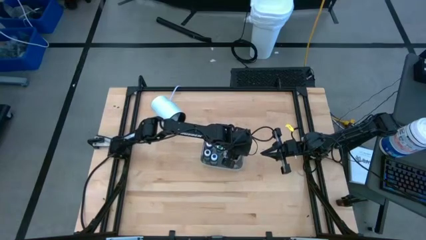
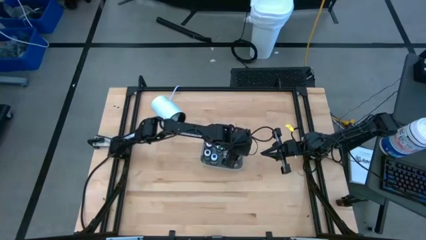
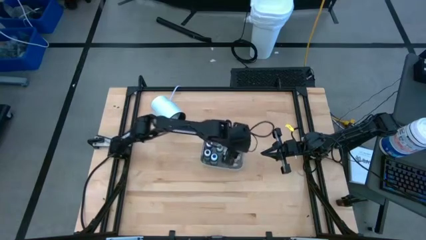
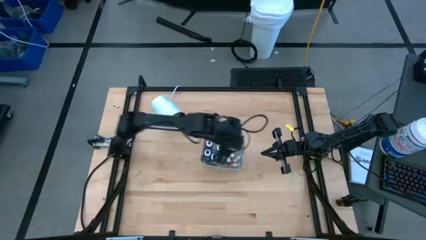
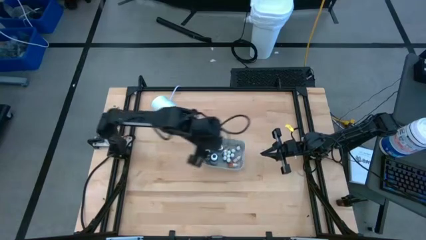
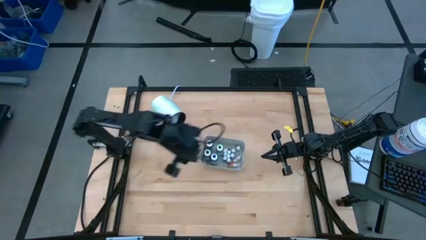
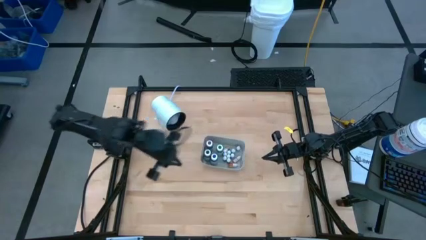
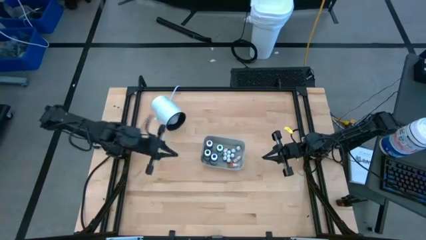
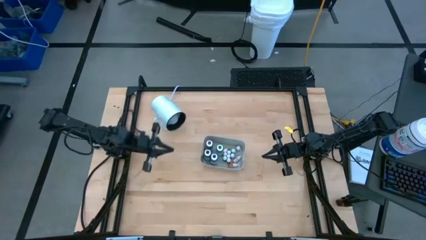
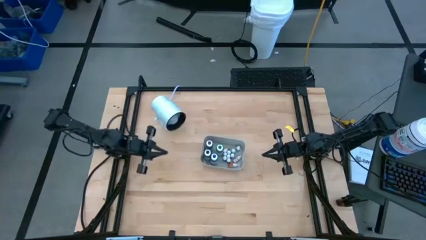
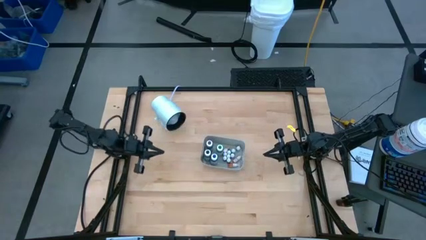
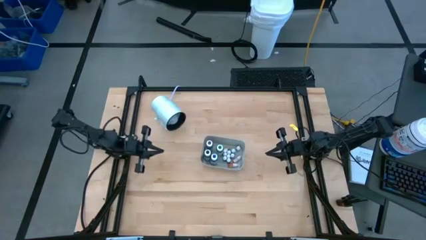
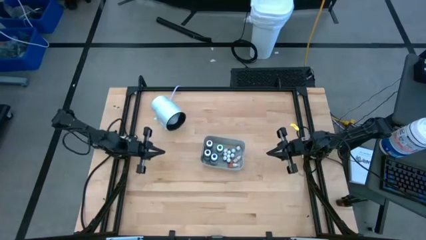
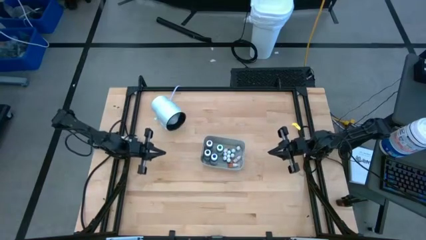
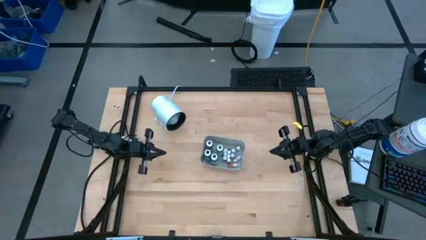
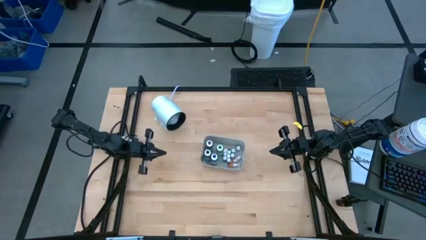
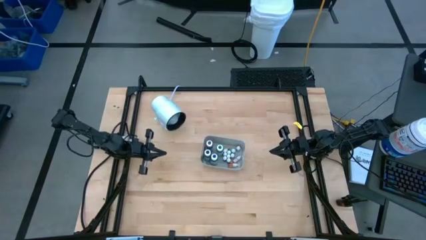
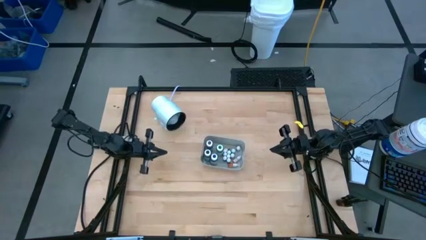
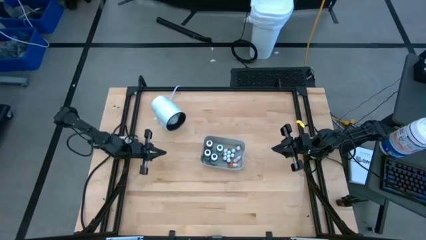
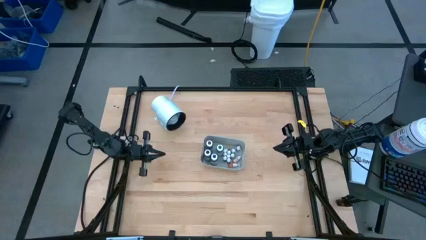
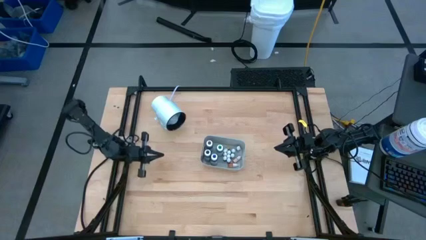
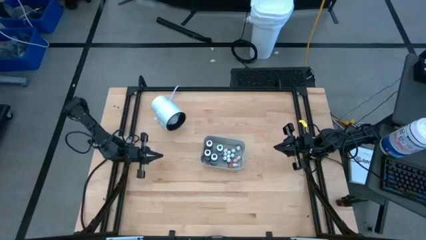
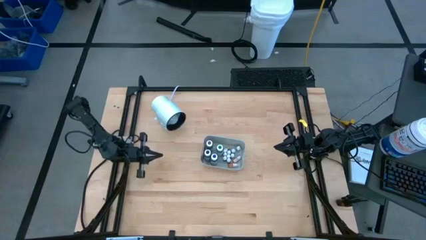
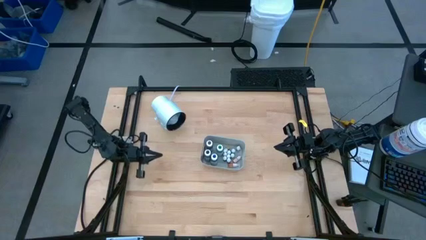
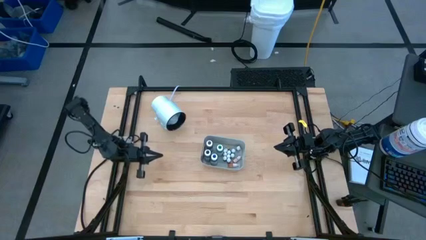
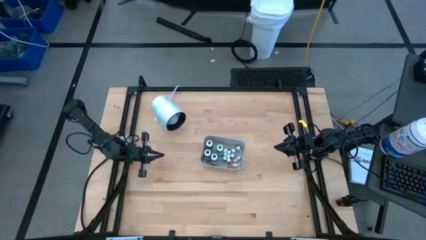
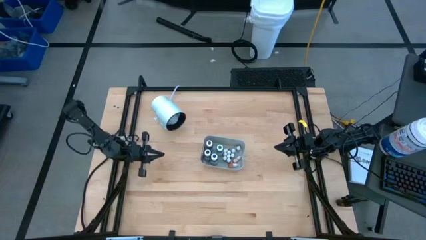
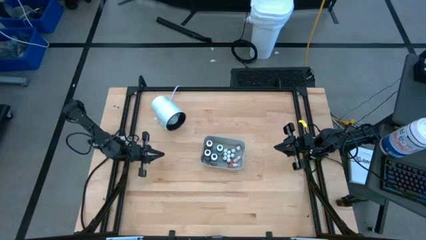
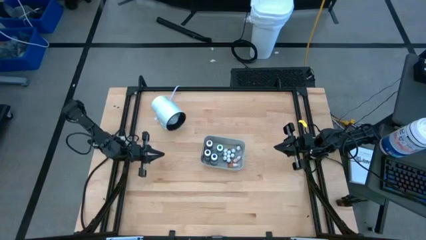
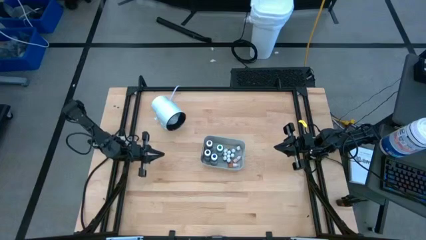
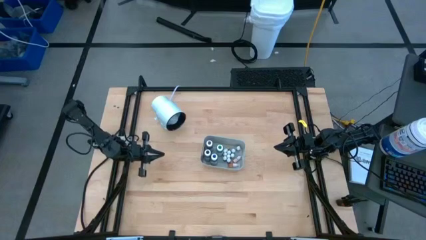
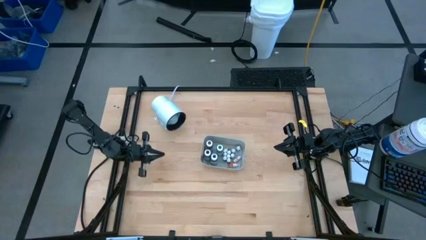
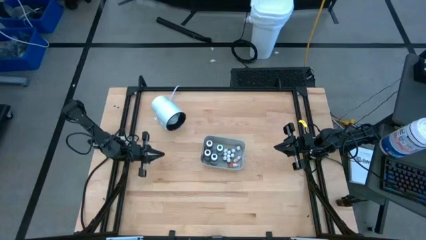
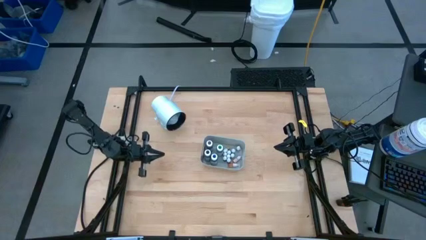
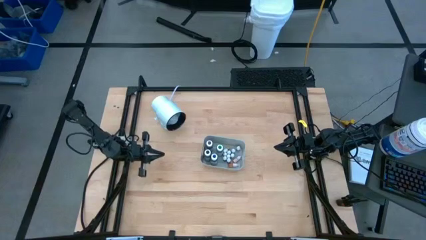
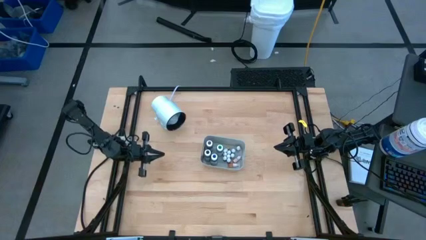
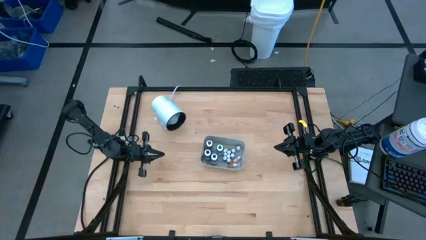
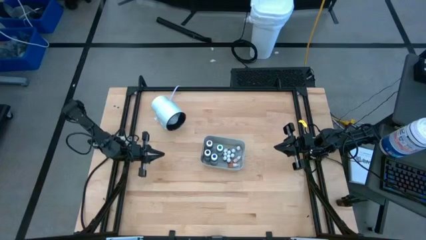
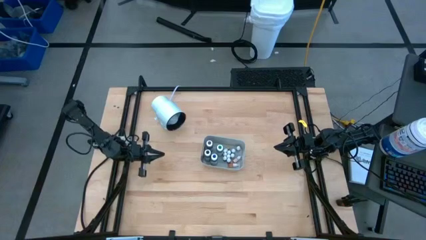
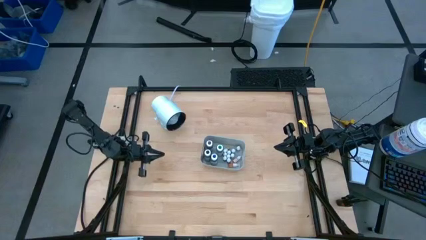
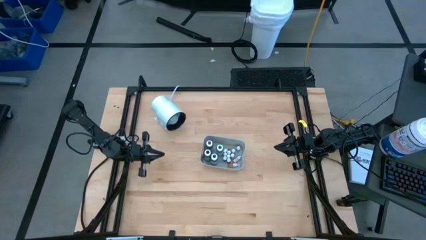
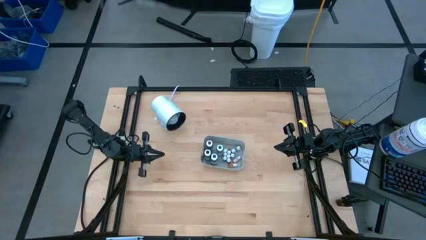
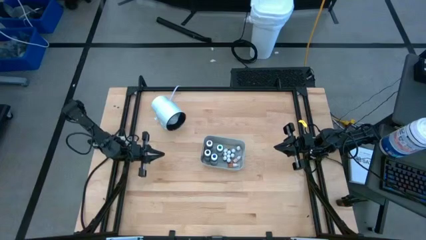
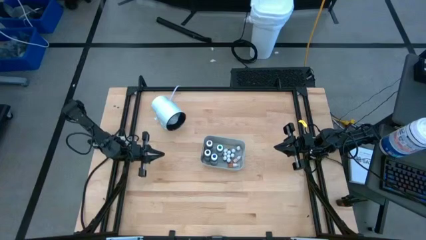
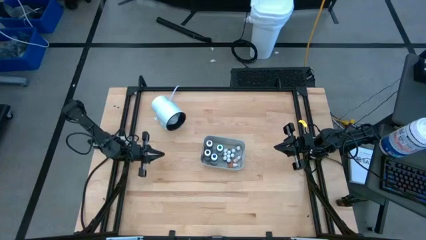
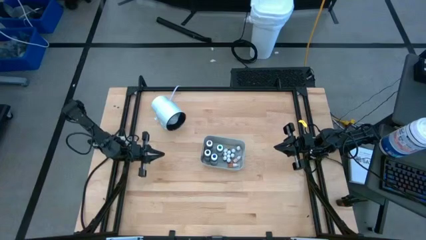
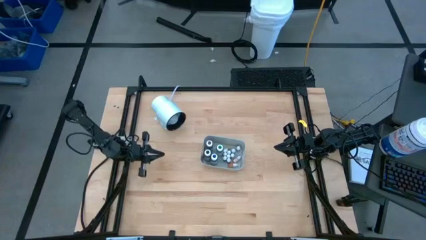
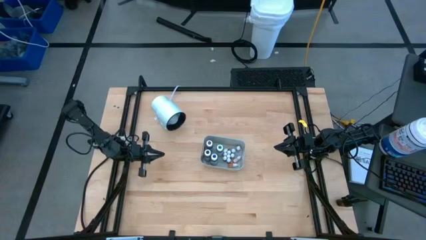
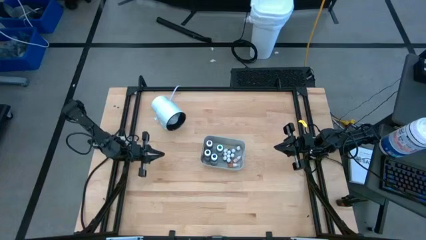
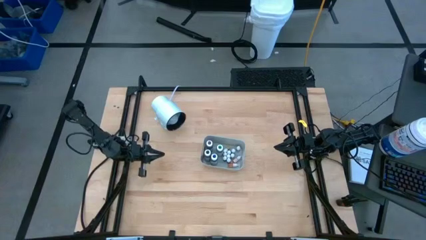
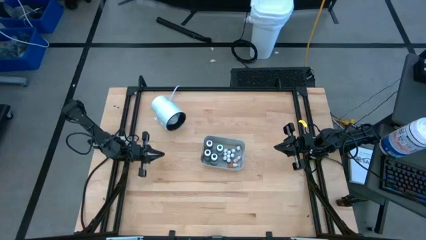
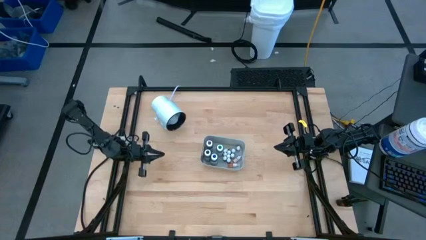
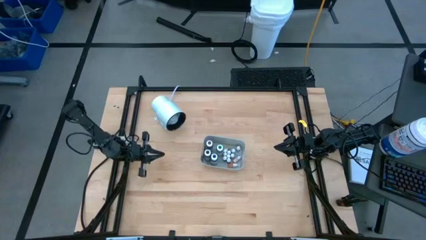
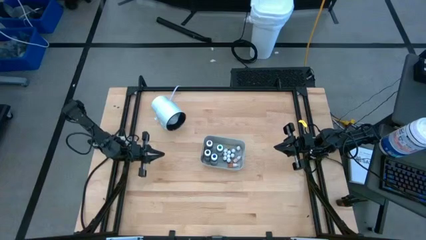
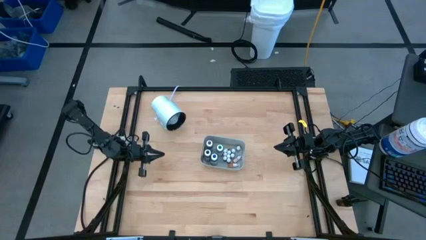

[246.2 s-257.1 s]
Task: Pick & Place food coloring
Return to Home Position

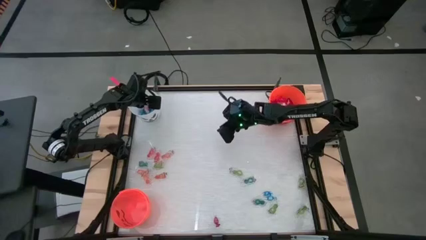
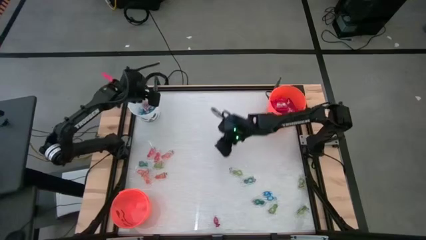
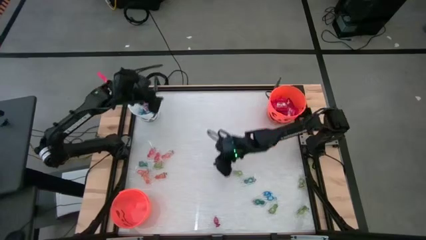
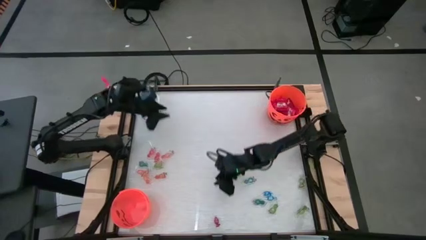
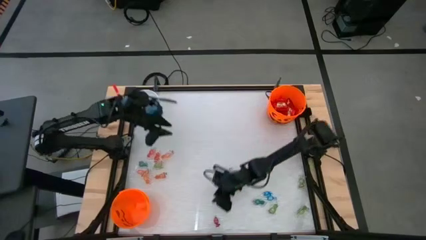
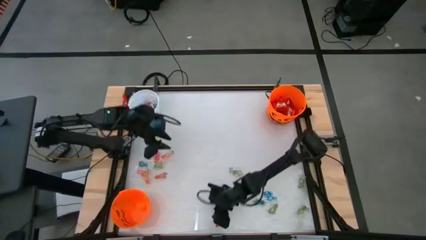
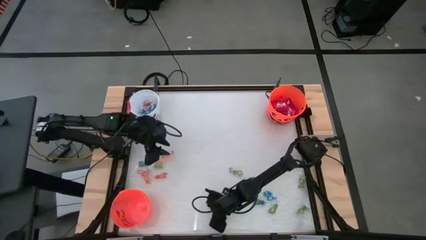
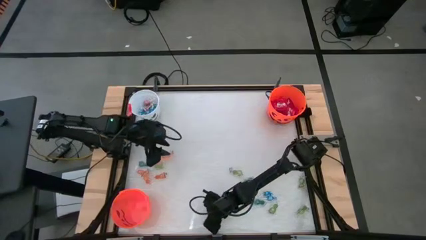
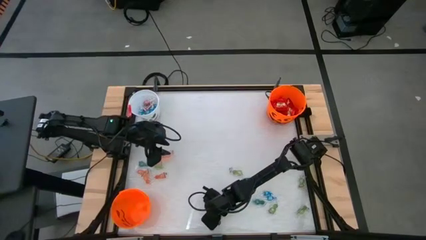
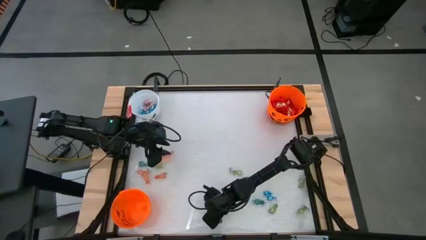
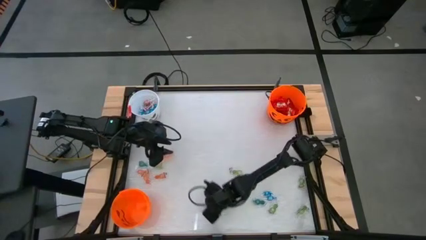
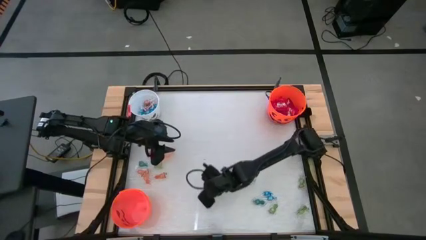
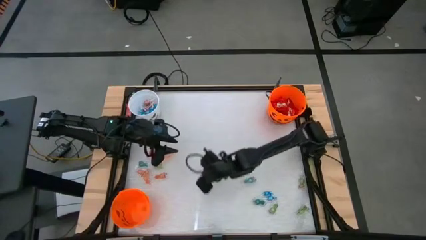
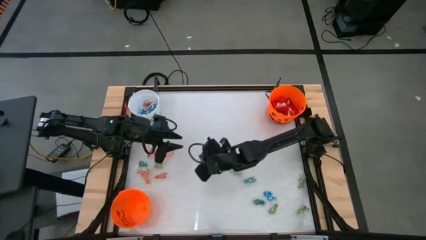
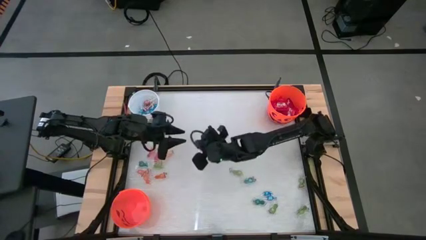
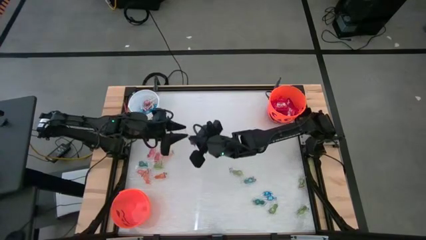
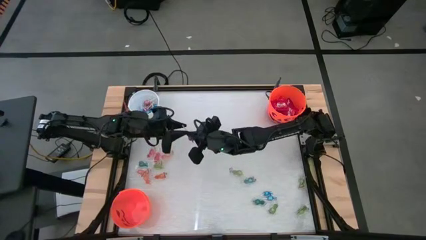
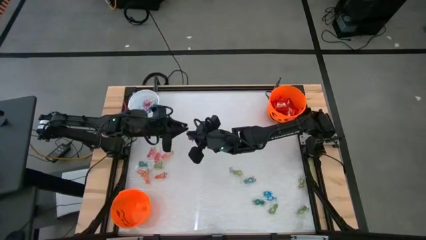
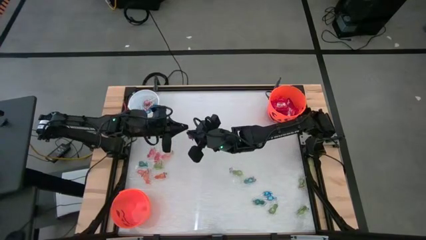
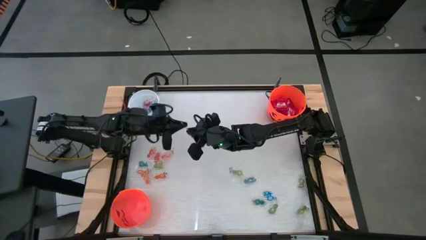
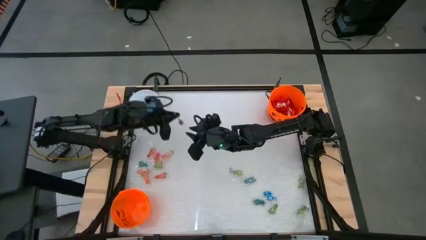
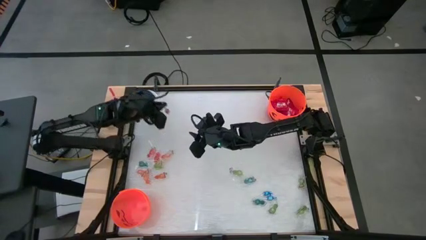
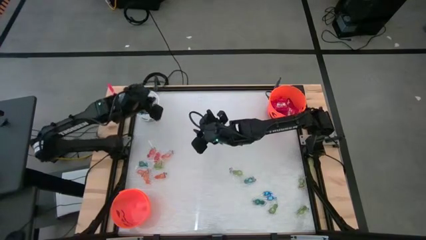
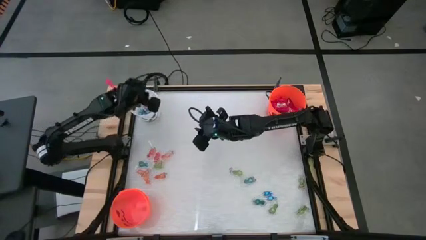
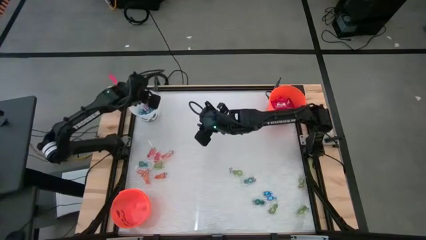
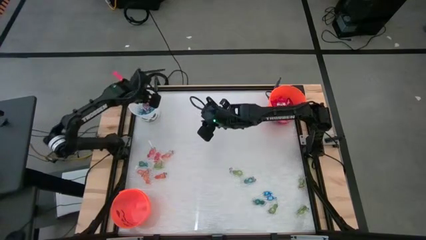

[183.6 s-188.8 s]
Task: Sort candy by brand, put in halloween buckets
Put the red lollipop into the white bucket
